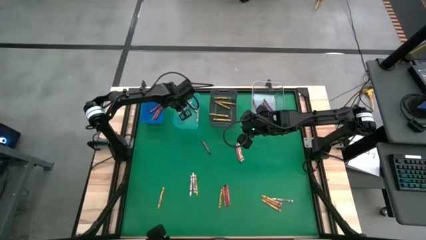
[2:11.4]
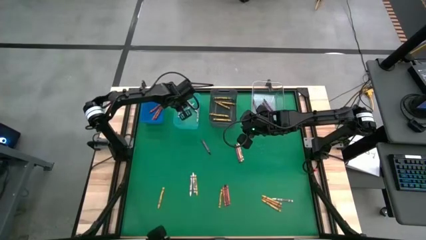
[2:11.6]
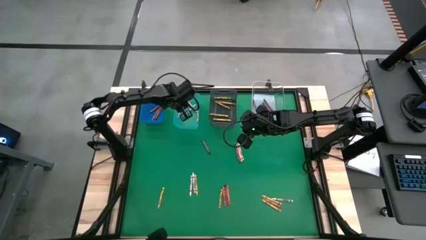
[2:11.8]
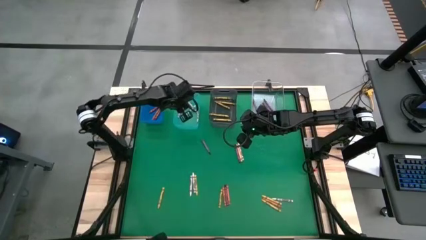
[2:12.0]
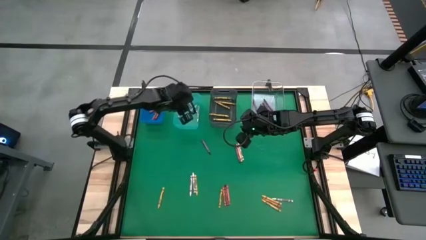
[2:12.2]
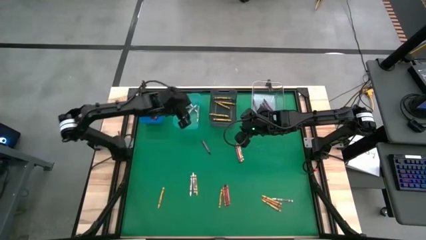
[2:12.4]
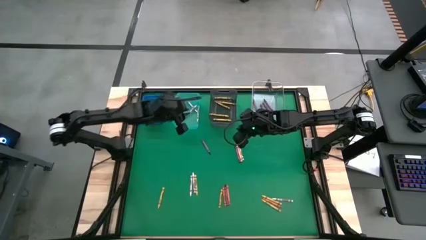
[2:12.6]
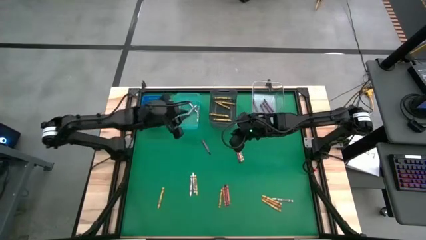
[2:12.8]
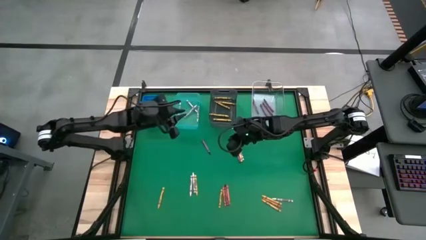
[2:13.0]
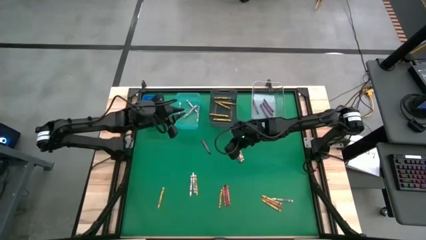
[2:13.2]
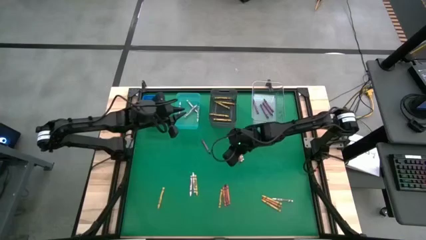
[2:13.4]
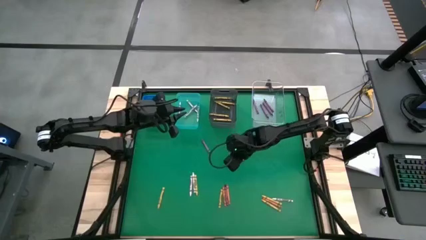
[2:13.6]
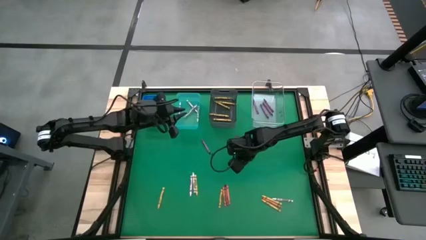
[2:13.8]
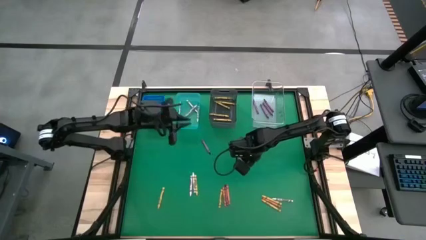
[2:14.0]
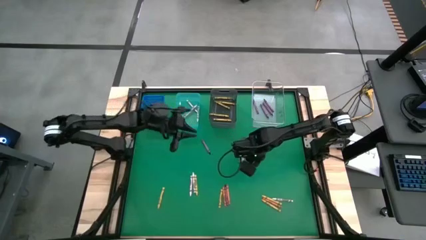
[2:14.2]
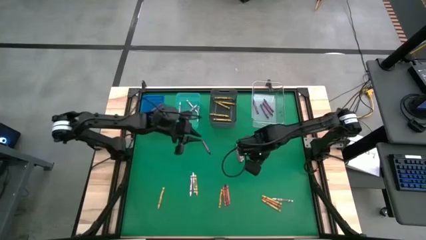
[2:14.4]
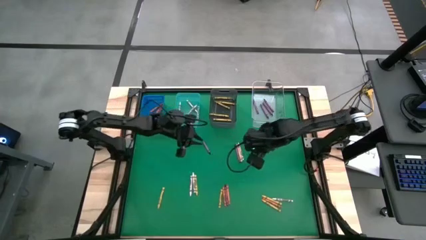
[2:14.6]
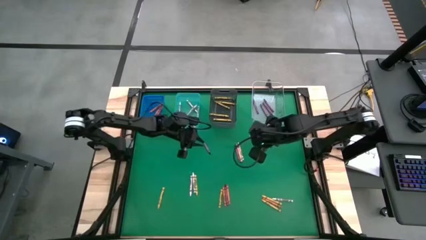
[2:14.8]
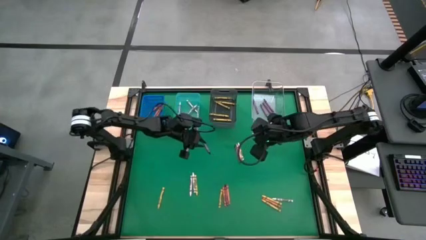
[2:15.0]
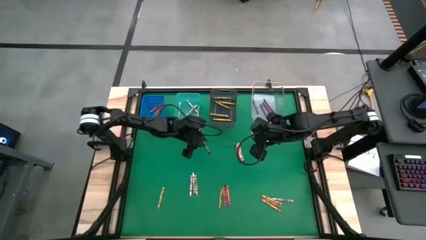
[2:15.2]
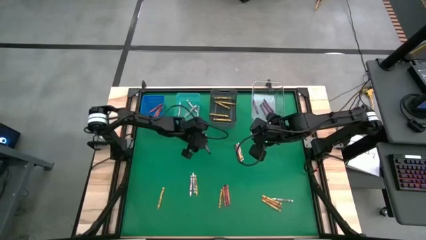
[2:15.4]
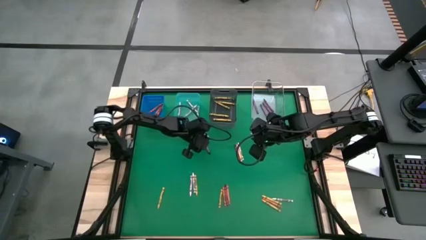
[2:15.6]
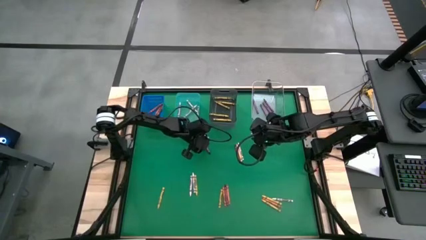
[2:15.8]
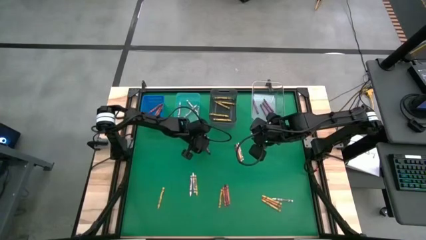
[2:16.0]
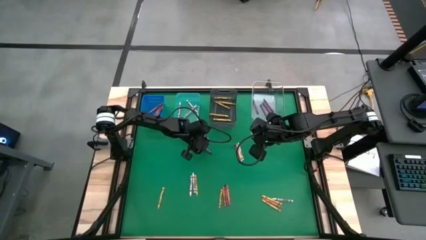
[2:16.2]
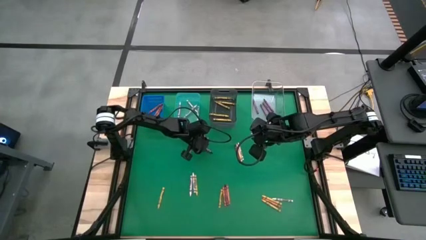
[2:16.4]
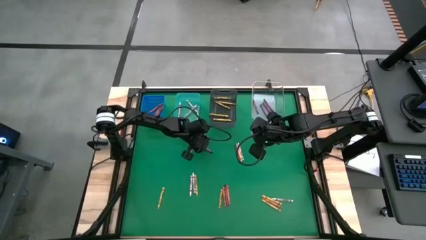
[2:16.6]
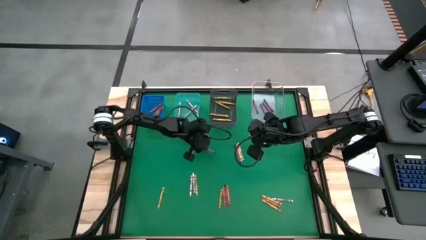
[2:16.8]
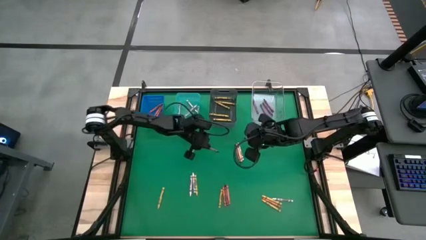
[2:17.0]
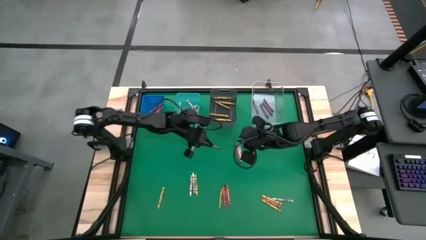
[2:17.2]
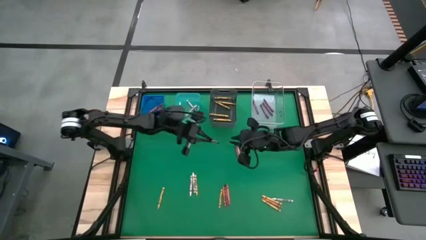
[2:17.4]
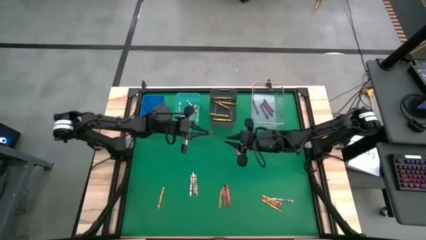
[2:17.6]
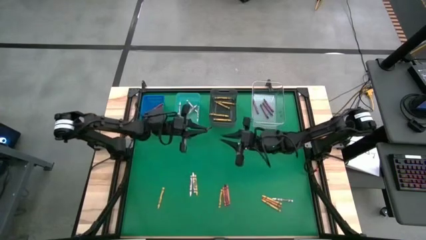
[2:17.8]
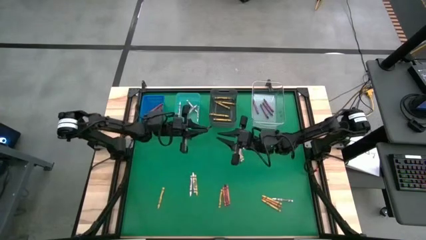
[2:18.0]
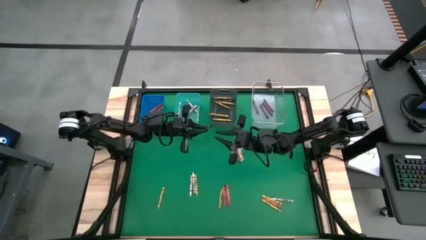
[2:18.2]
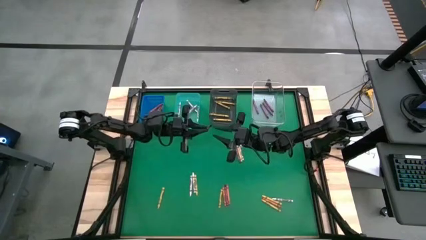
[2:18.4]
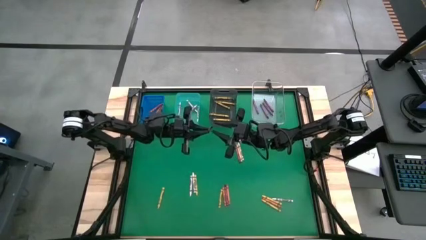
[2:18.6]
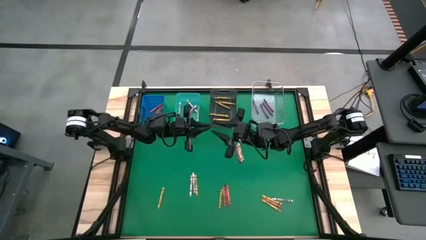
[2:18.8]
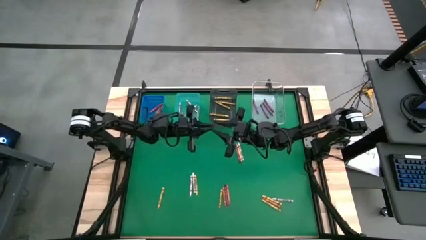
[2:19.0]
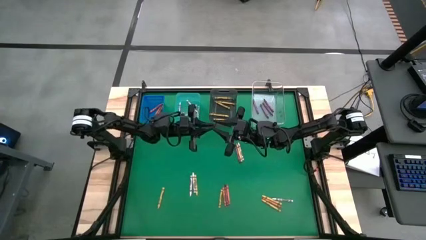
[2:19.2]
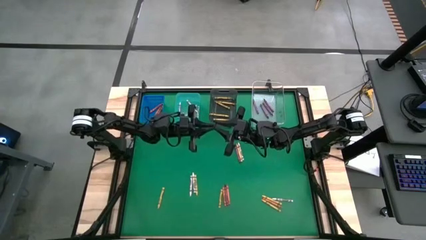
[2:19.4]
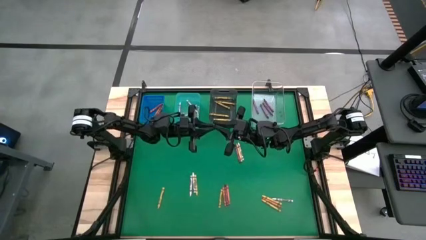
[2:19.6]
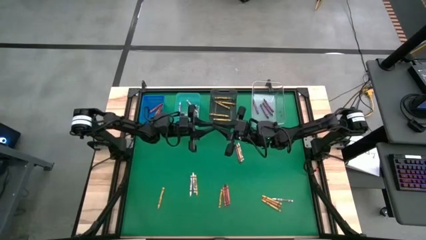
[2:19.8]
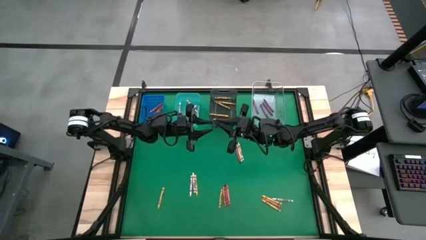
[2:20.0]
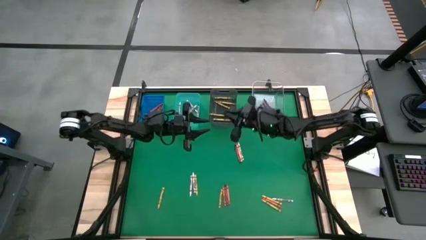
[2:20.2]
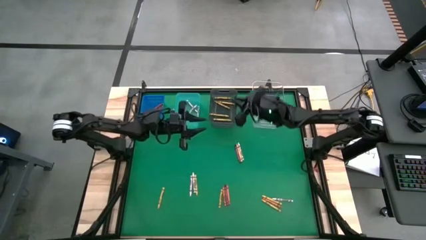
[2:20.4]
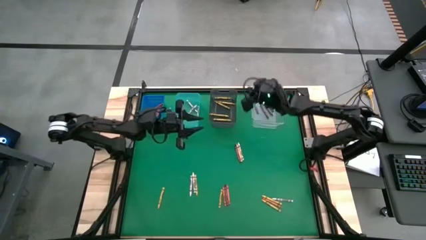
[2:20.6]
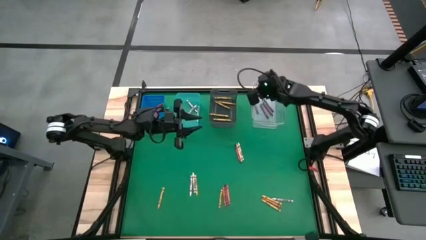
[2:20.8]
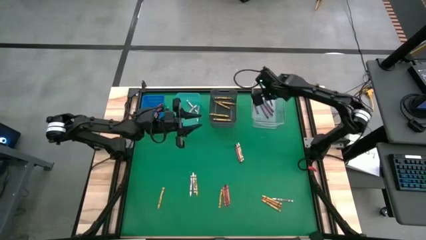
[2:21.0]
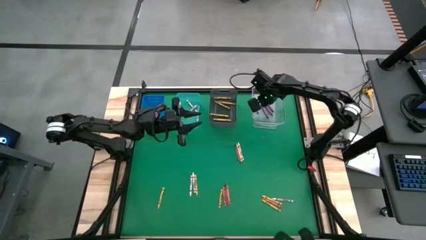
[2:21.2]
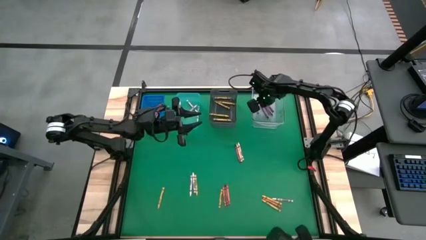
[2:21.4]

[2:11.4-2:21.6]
Task: Sort crayons
Put the violet crayon into the transparent bin

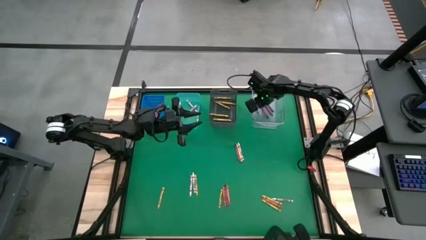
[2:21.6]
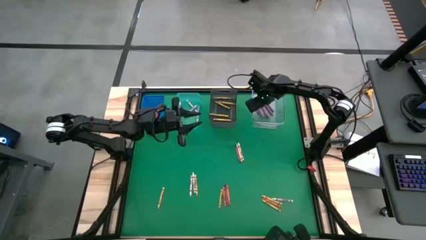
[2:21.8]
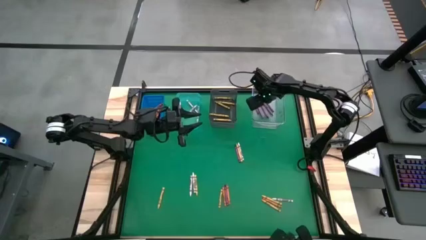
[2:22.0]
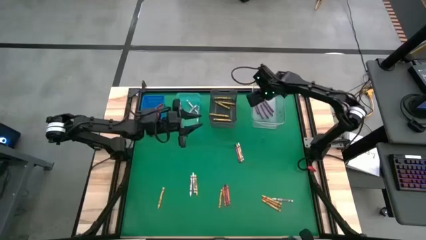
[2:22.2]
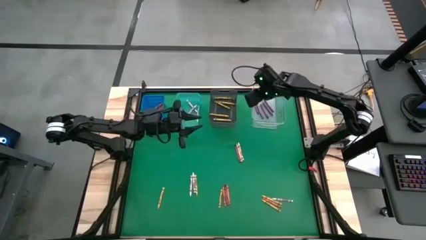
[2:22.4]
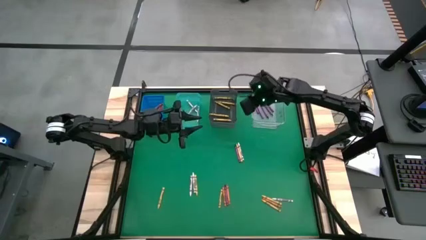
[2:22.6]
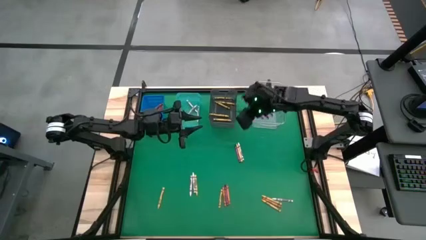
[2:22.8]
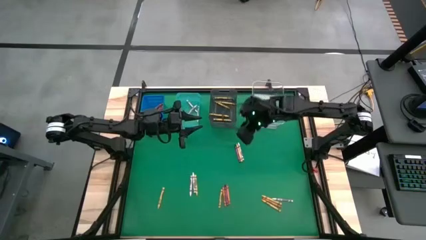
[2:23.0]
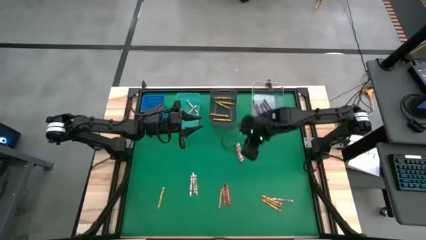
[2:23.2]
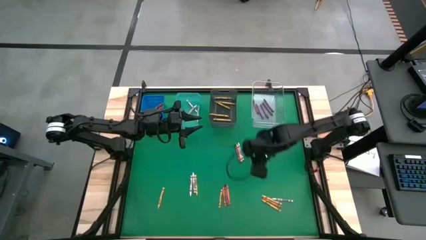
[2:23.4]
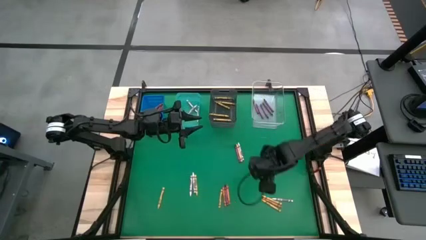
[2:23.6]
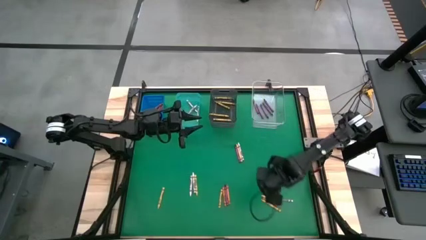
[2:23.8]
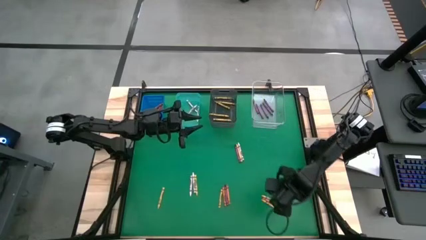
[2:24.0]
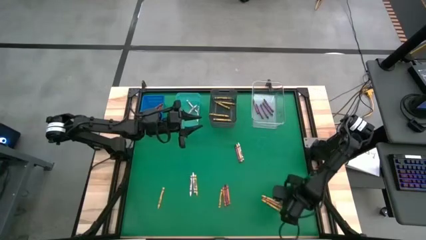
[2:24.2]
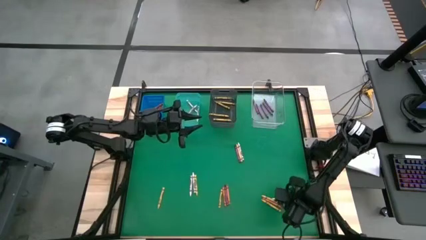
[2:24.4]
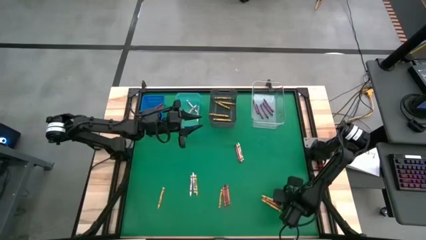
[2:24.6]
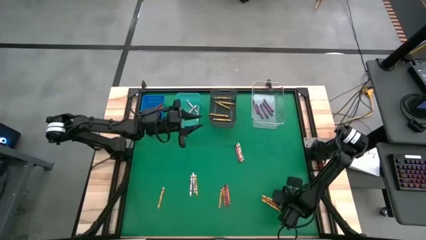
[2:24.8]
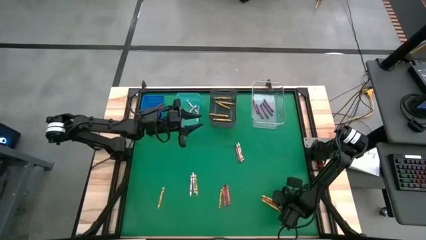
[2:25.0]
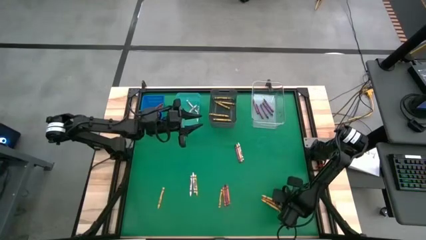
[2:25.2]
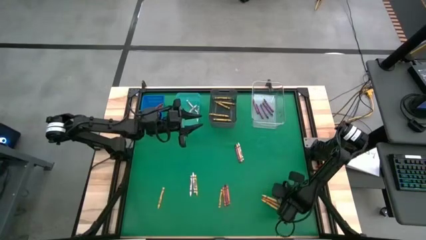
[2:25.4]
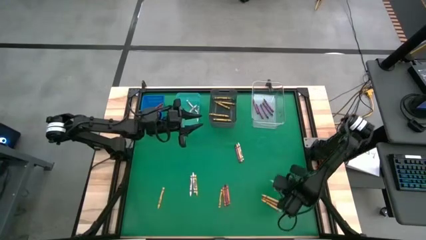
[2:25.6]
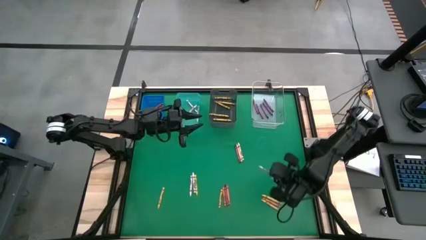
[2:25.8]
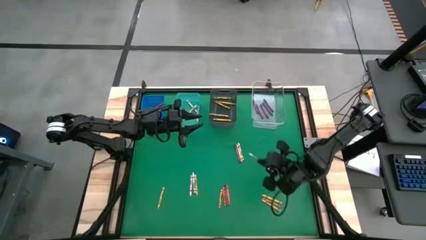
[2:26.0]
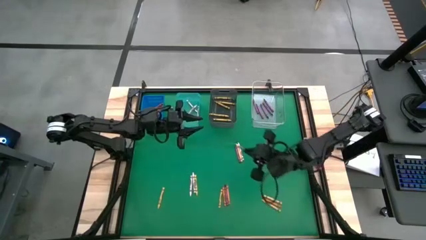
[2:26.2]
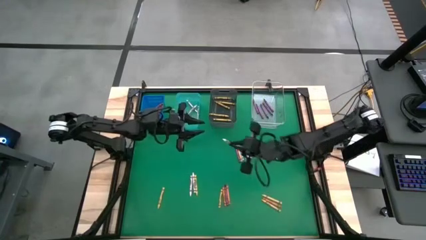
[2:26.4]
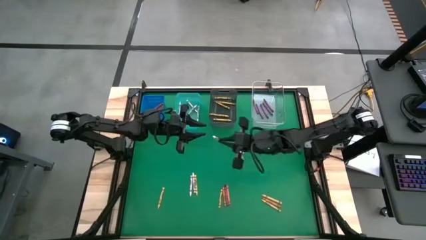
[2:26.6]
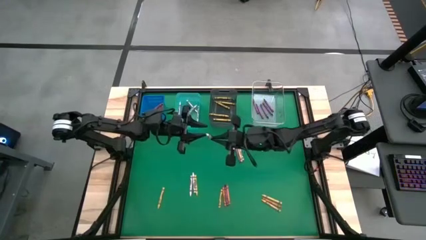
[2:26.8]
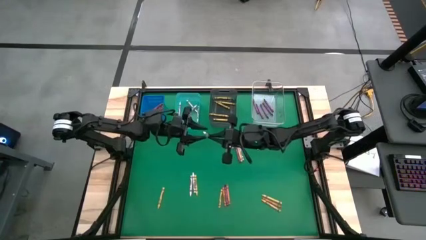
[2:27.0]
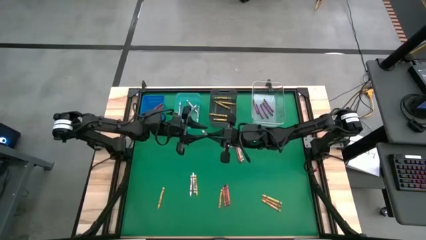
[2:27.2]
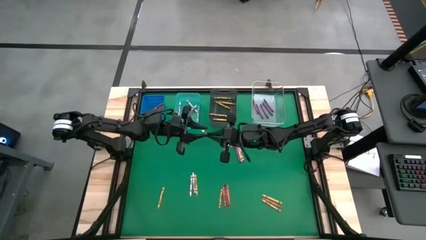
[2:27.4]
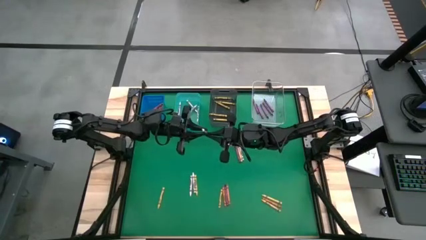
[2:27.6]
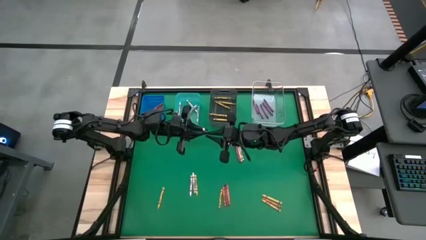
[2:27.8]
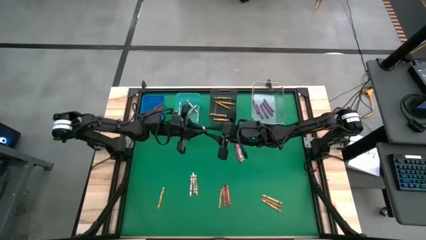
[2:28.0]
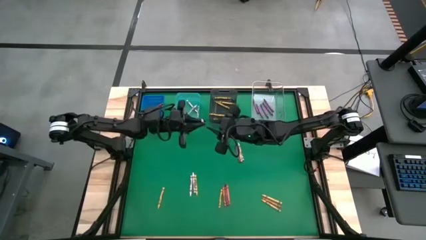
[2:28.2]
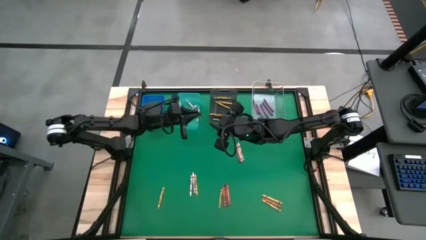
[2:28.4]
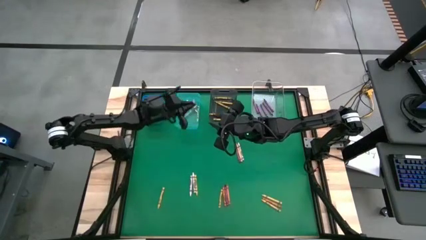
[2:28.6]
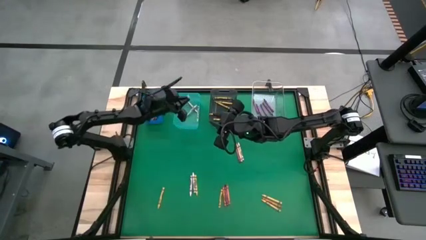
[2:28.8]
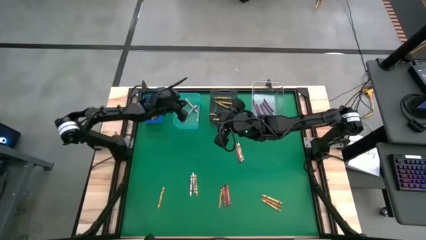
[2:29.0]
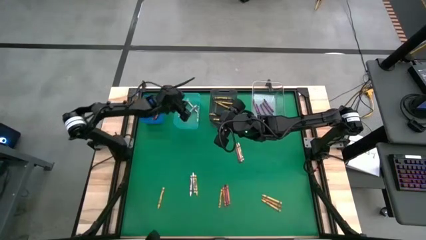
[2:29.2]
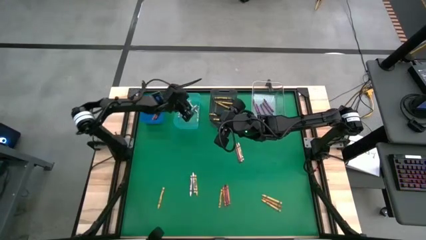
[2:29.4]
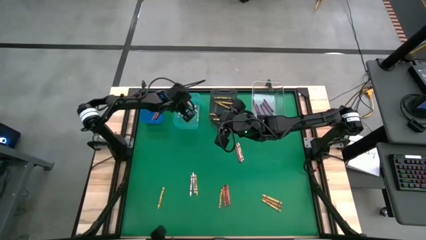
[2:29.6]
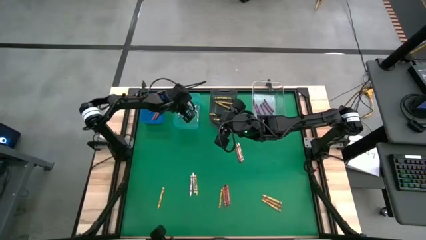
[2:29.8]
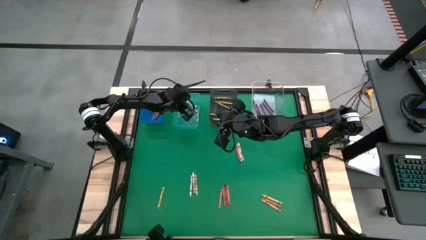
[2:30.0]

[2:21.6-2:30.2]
Put the white crayon into the light blue bin
